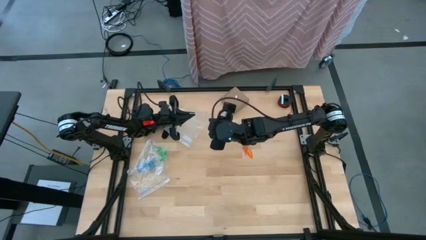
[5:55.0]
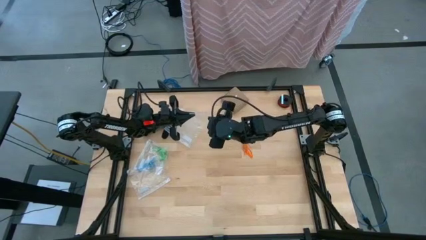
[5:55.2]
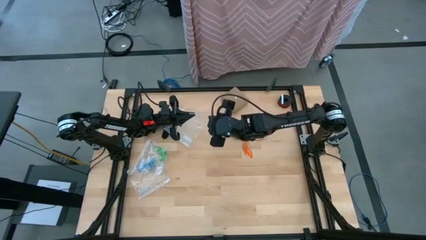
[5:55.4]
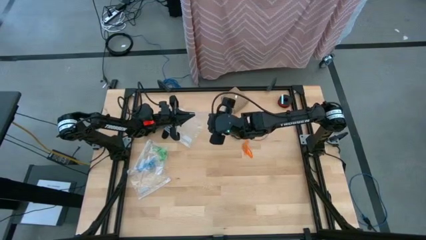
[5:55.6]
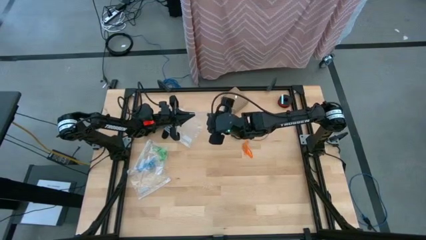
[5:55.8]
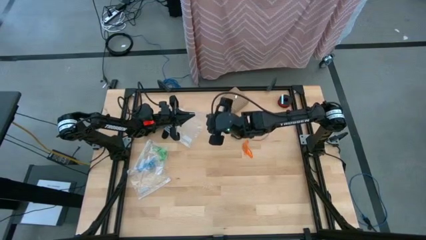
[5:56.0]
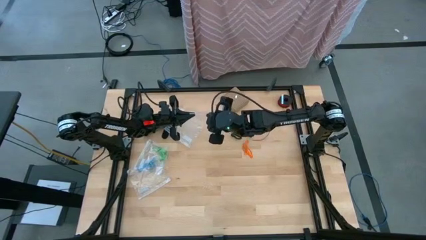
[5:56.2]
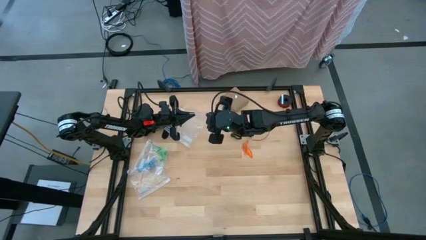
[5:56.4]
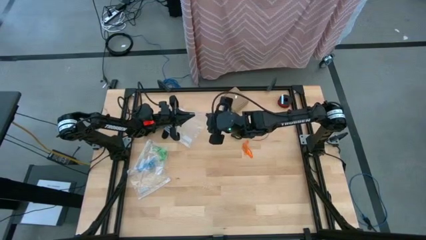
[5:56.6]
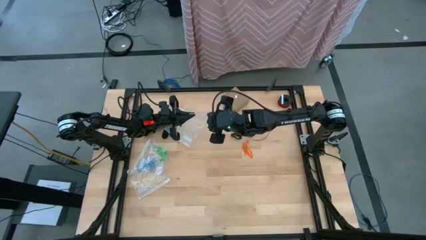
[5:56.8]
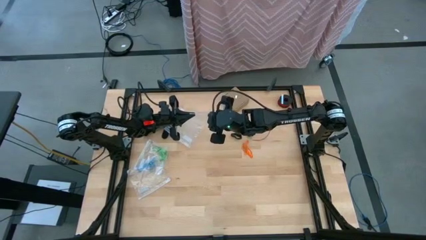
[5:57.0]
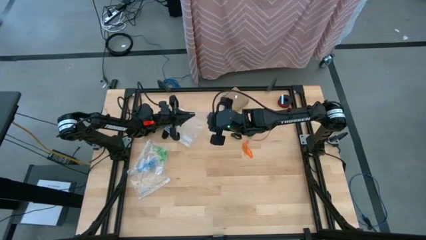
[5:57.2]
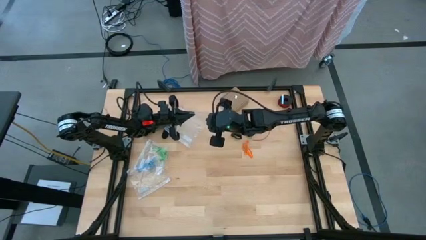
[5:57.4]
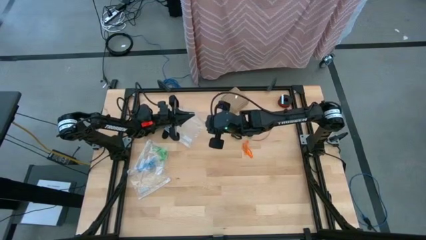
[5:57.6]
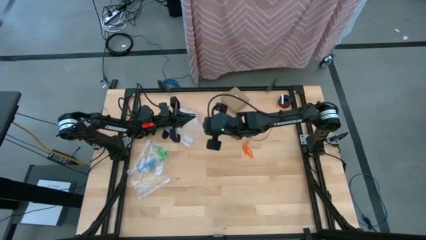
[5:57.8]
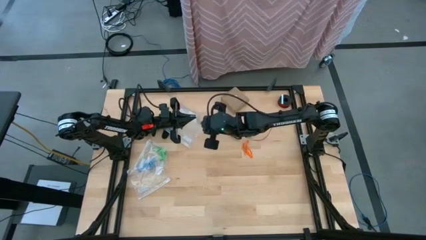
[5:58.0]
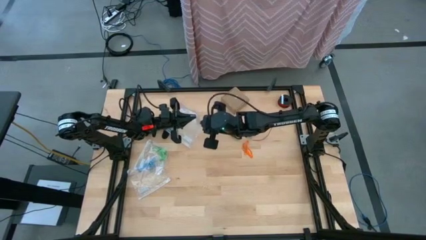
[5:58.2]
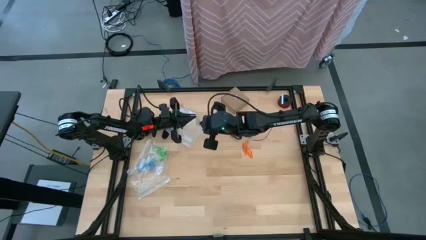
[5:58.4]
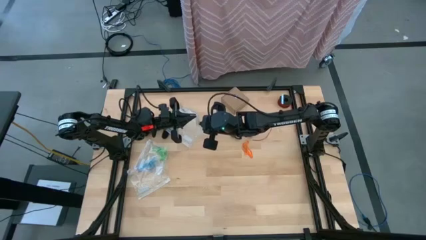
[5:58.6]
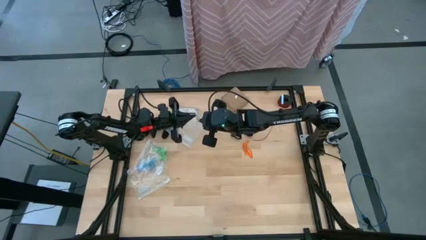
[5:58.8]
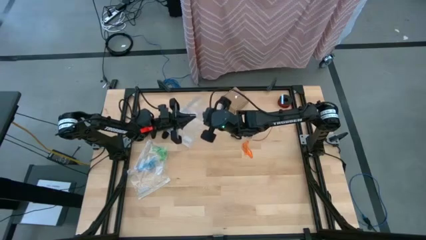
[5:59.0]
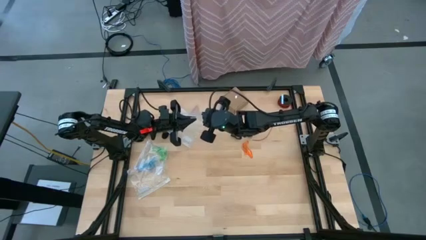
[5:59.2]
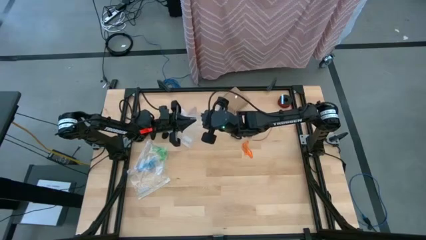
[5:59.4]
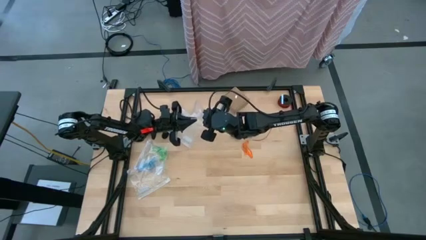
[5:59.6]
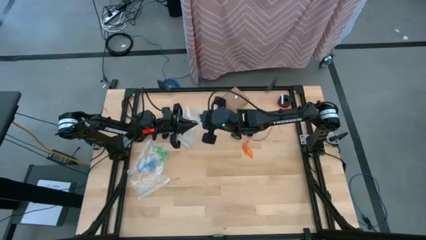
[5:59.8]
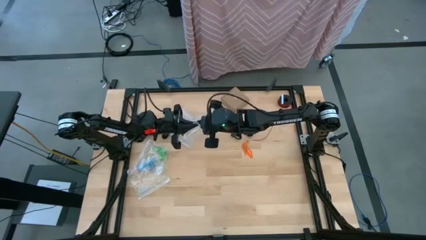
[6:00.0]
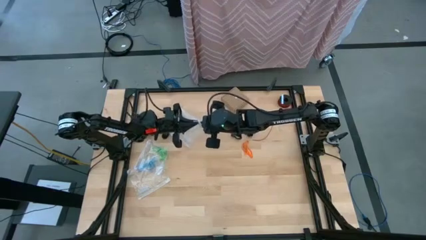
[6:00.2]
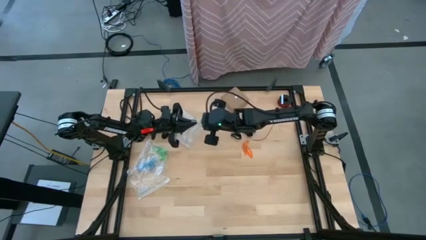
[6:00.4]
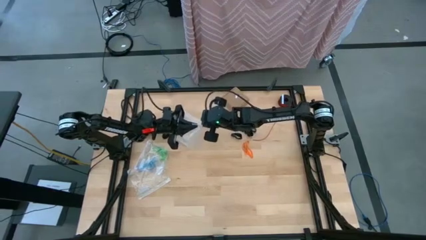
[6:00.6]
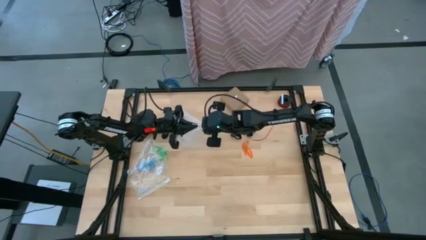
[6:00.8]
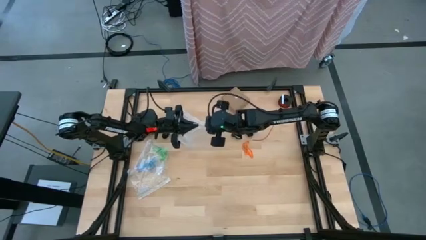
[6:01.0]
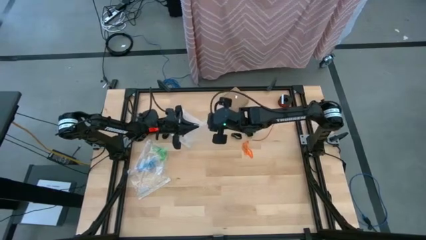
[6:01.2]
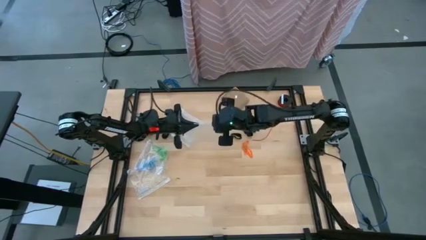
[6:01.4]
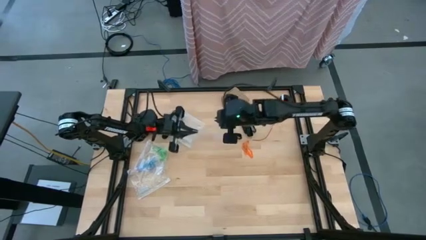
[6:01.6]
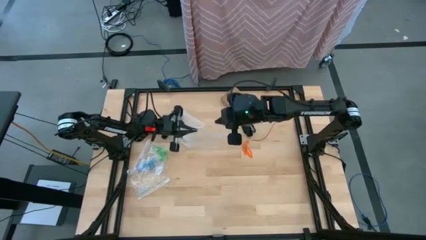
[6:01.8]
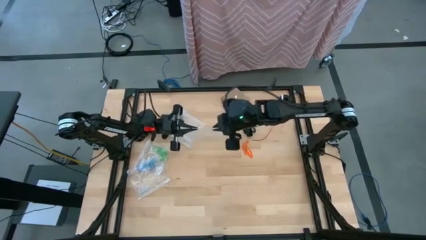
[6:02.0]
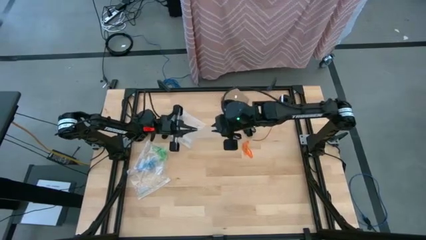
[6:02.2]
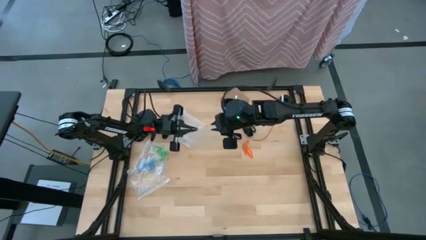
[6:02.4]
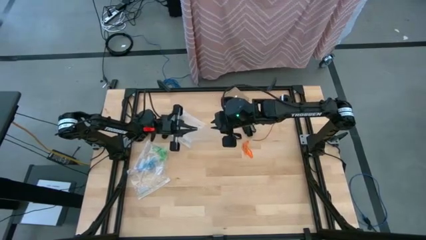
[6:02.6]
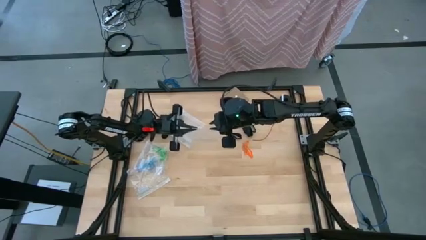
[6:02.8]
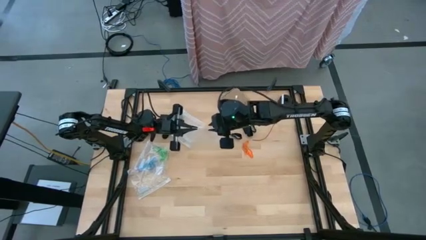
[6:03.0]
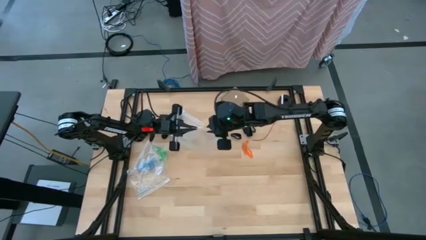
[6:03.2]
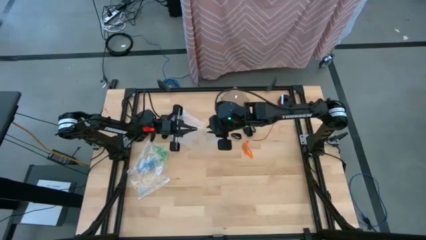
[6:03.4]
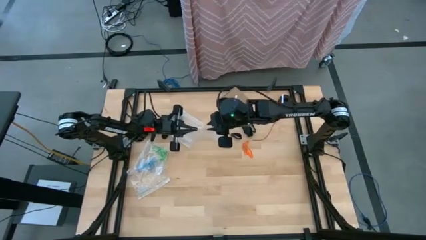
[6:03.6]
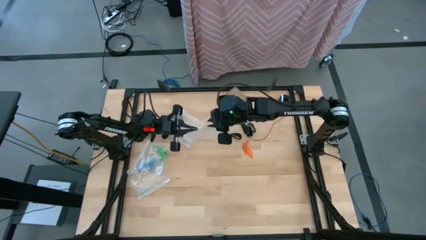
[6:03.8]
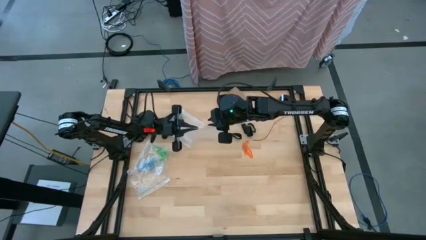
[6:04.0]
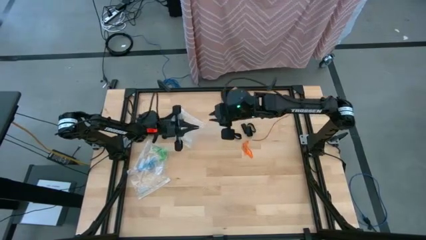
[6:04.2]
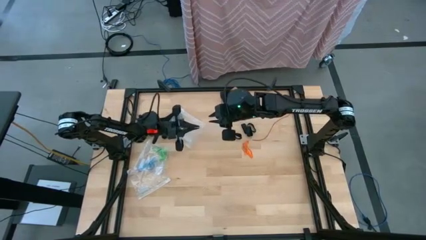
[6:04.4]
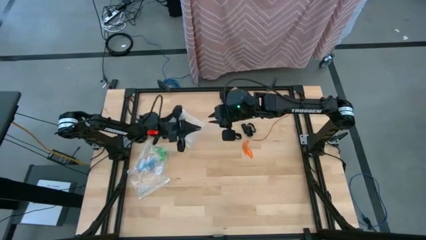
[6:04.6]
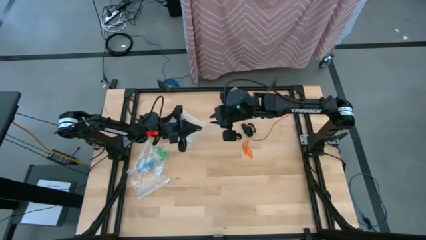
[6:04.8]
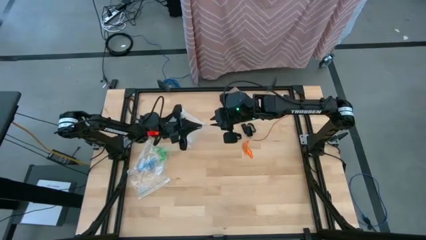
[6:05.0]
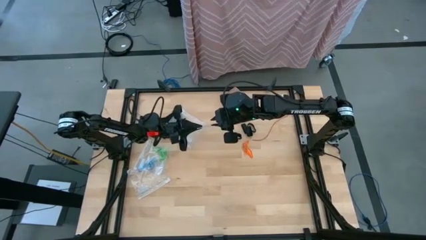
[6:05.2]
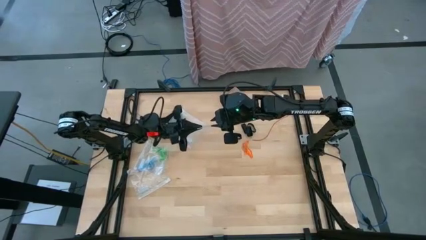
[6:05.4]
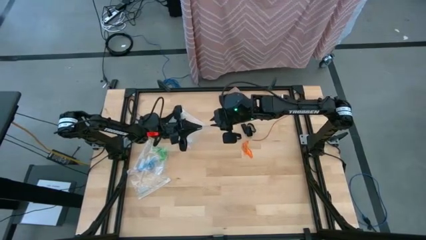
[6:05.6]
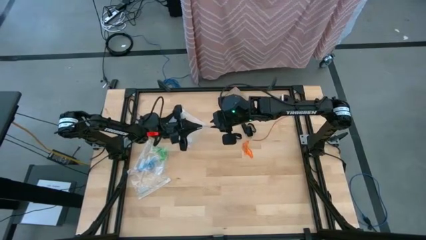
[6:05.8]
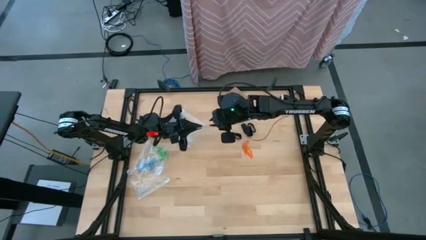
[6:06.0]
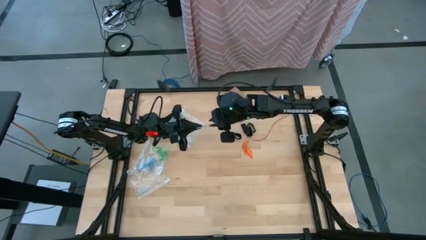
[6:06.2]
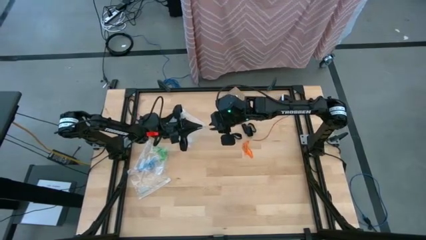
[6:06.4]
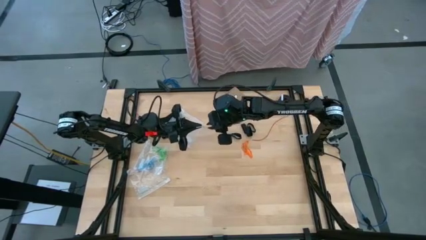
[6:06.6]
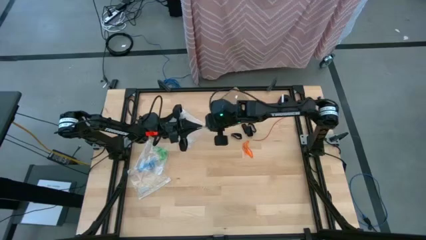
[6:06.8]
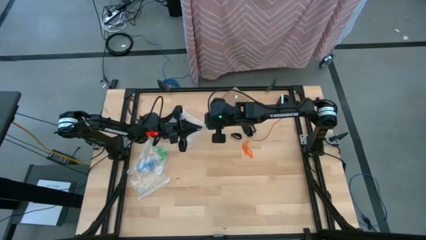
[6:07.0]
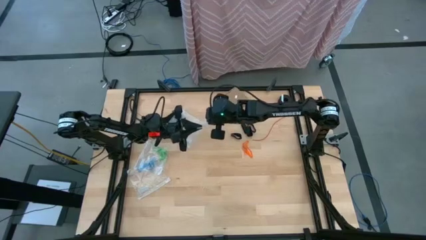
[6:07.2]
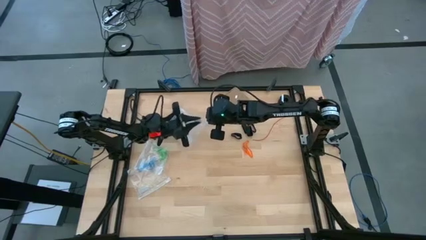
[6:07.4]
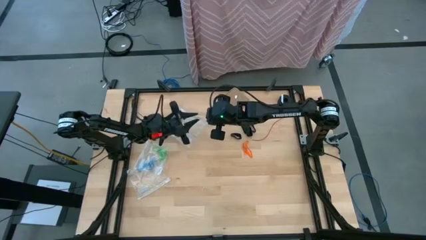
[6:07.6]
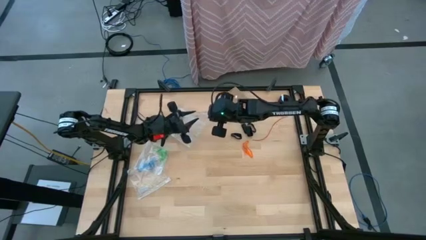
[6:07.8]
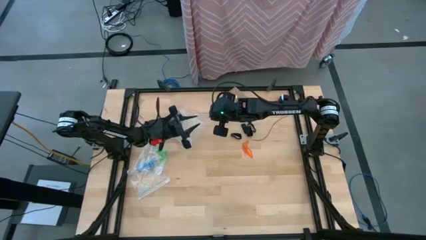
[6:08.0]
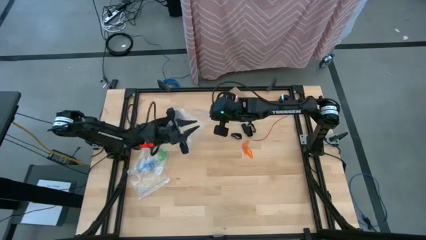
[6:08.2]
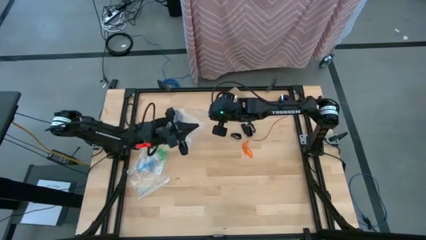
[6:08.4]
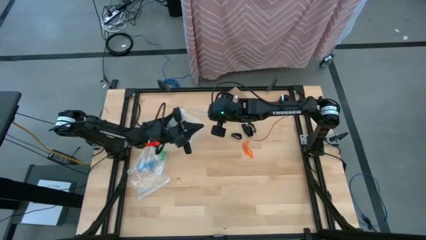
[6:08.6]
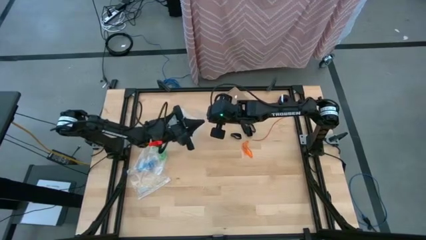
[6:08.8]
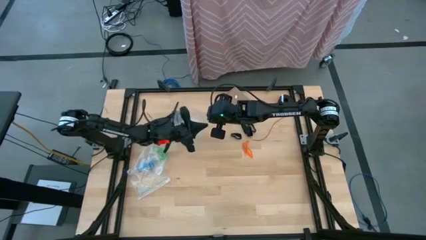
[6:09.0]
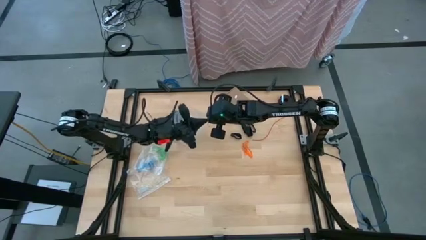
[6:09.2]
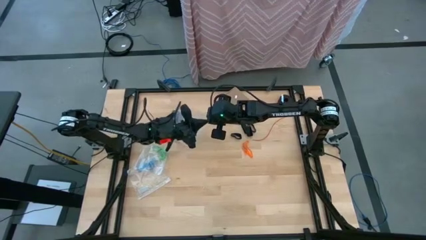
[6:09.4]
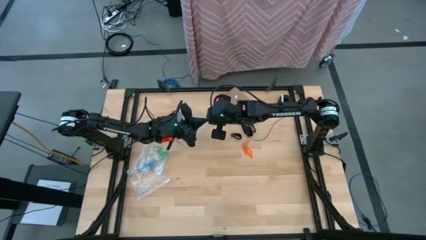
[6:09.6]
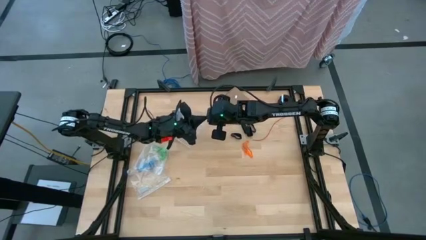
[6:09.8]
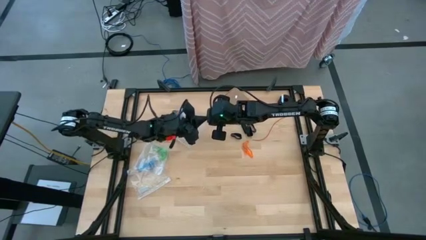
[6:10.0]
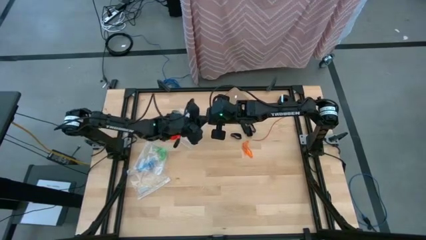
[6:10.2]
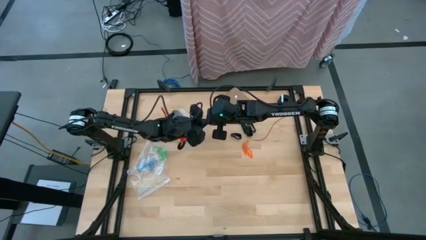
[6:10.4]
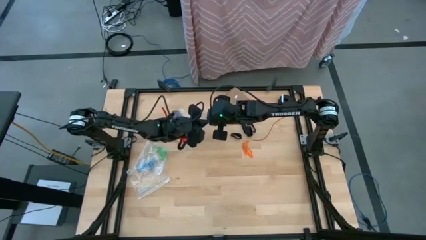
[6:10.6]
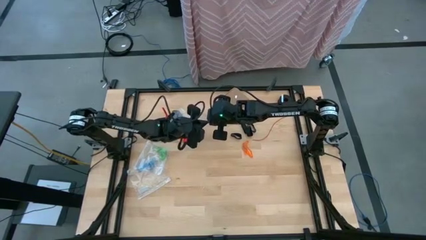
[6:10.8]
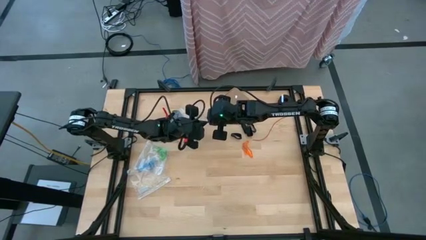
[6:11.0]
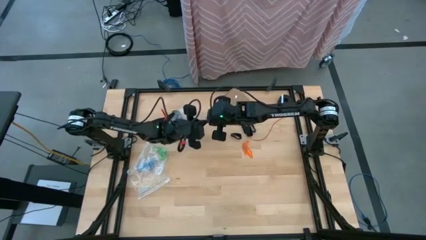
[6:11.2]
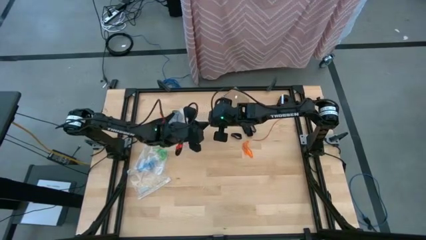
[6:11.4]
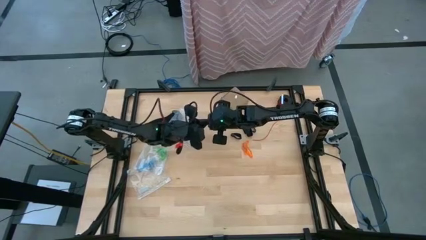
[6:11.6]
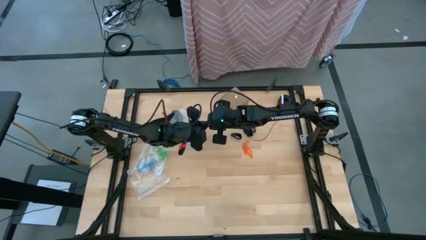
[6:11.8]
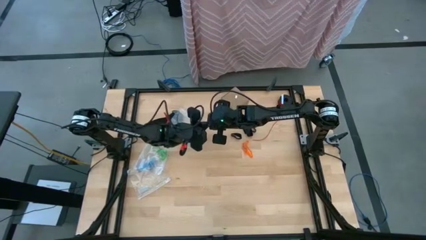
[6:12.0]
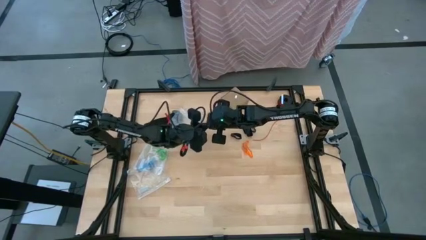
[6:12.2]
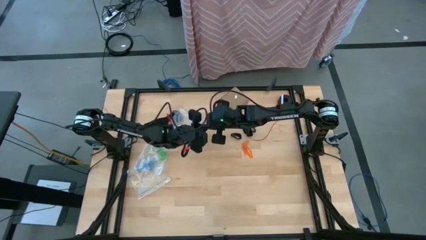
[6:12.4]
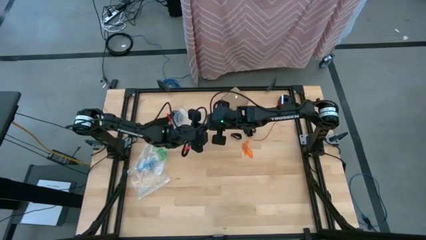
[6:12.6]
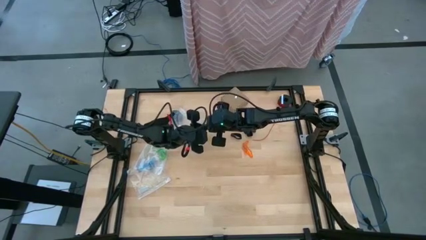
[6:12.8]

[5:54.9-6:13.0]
Task: Sort rubber bands
Open the transparent zip bag
